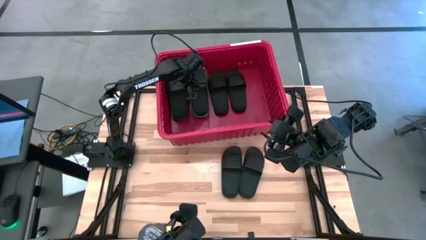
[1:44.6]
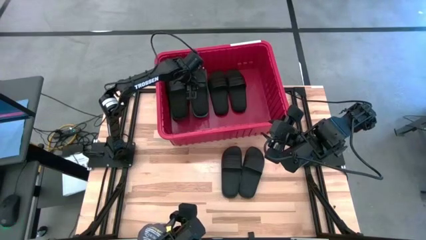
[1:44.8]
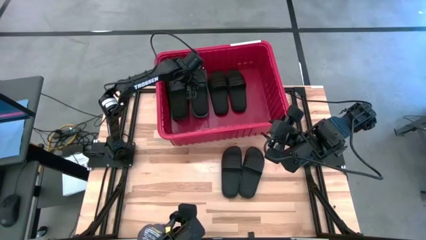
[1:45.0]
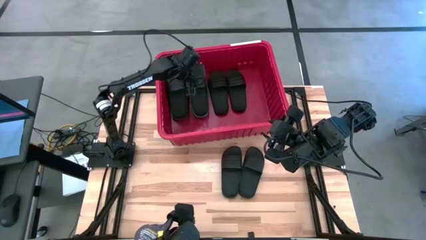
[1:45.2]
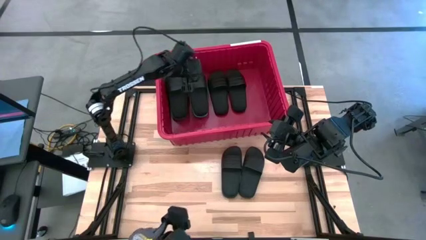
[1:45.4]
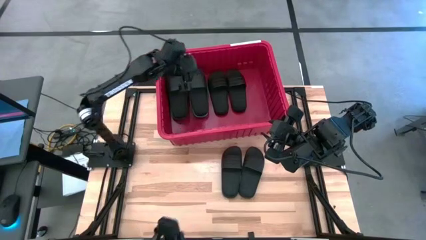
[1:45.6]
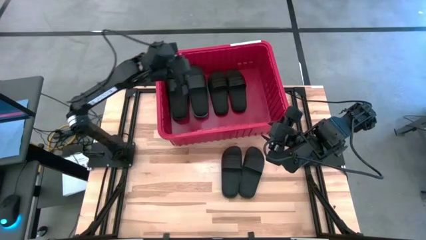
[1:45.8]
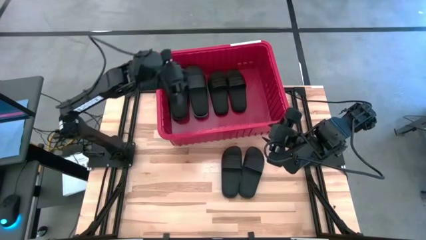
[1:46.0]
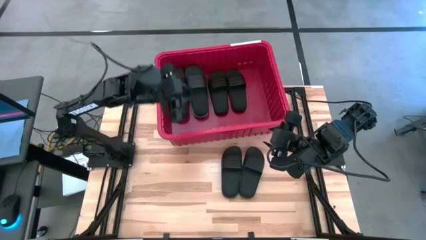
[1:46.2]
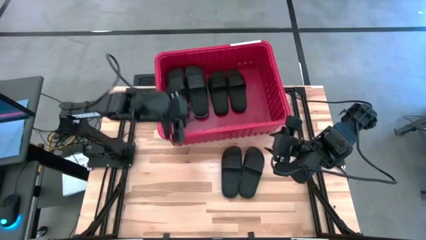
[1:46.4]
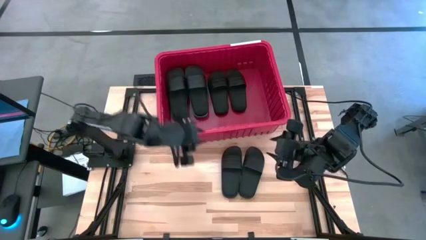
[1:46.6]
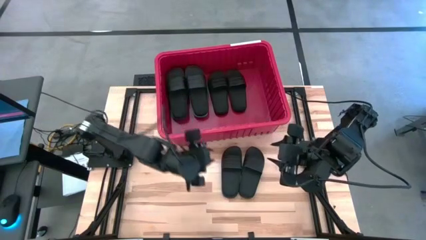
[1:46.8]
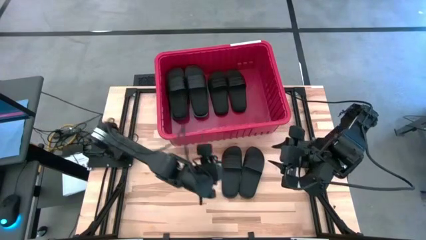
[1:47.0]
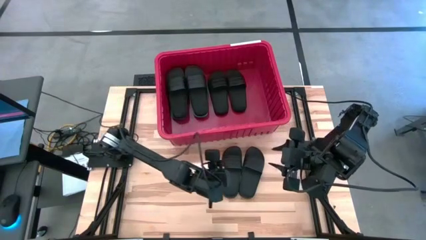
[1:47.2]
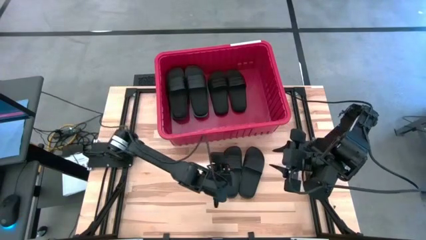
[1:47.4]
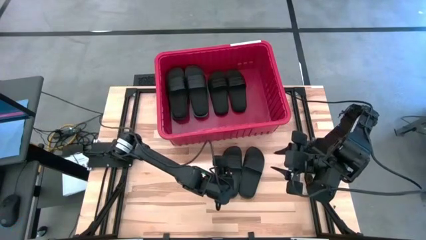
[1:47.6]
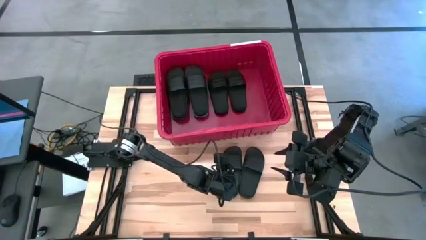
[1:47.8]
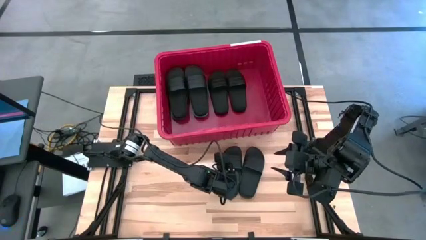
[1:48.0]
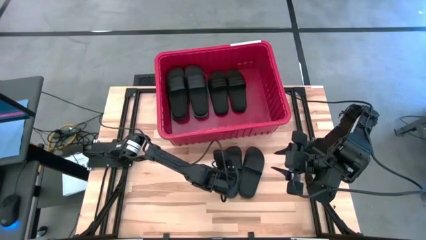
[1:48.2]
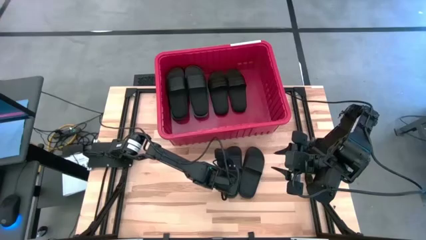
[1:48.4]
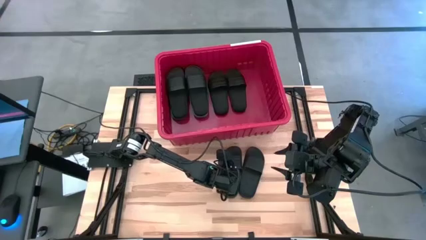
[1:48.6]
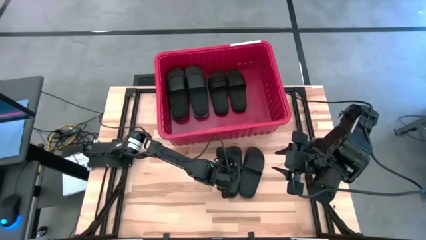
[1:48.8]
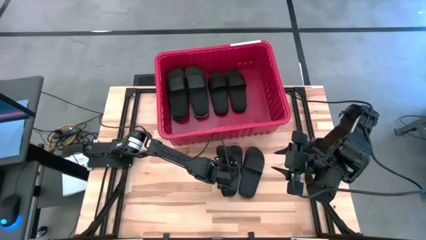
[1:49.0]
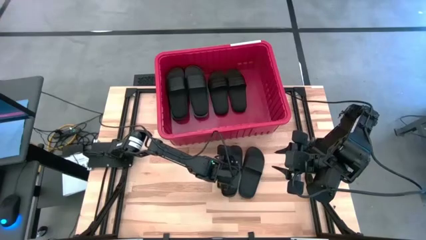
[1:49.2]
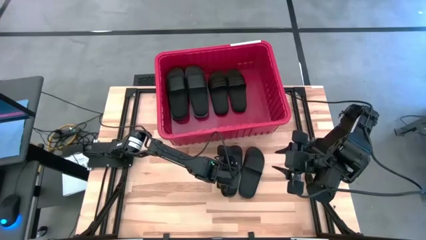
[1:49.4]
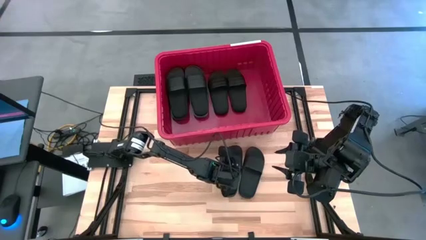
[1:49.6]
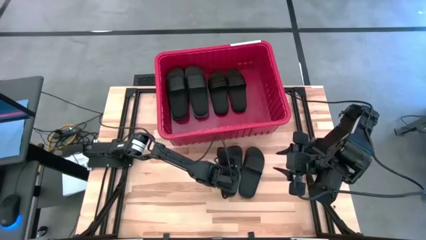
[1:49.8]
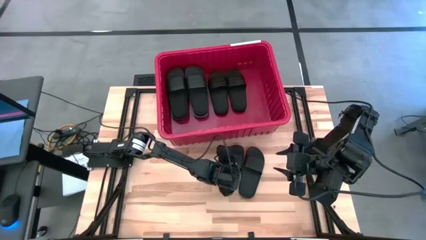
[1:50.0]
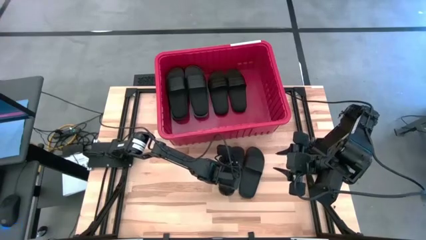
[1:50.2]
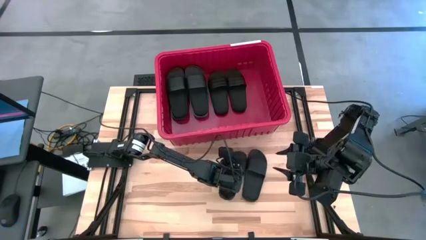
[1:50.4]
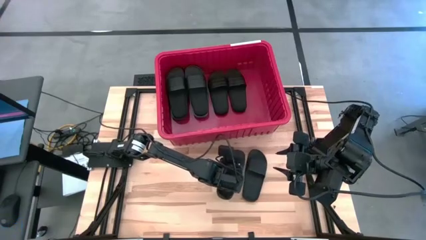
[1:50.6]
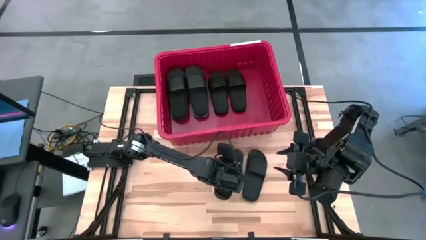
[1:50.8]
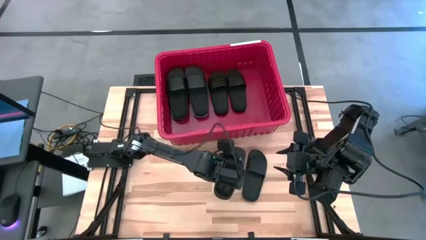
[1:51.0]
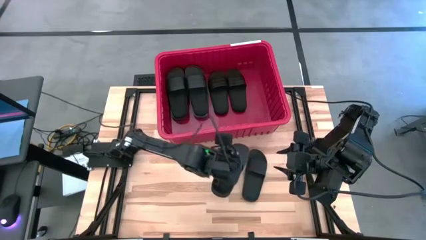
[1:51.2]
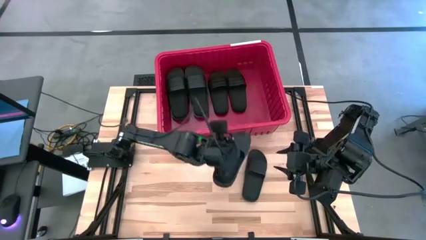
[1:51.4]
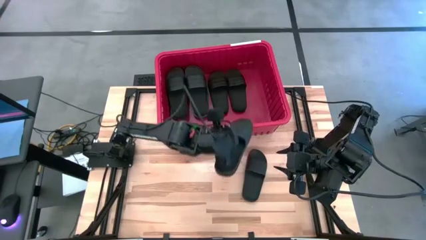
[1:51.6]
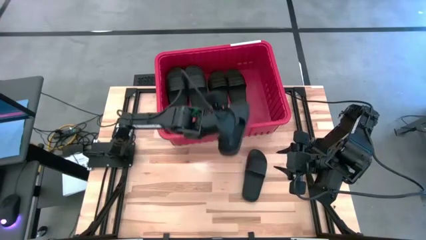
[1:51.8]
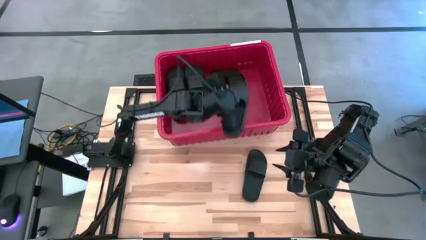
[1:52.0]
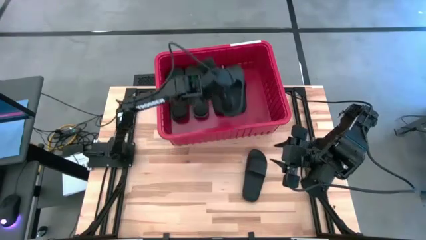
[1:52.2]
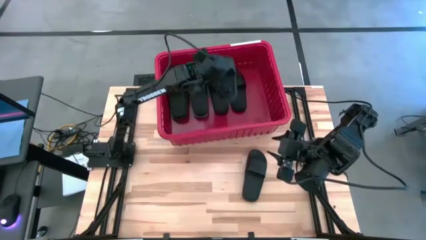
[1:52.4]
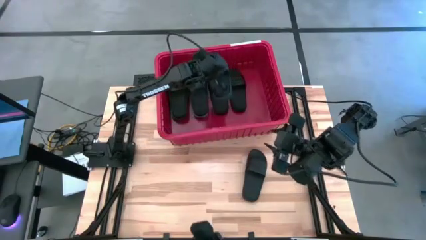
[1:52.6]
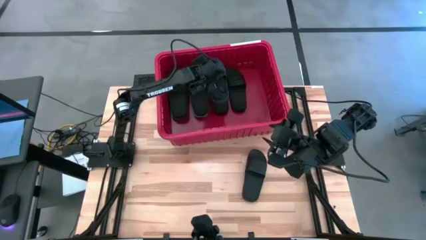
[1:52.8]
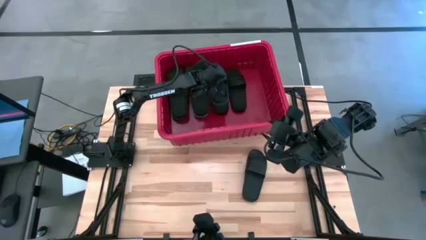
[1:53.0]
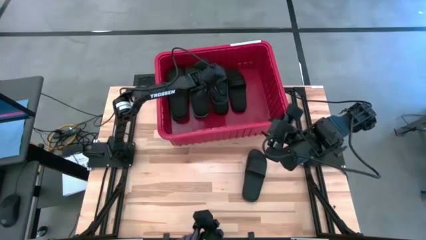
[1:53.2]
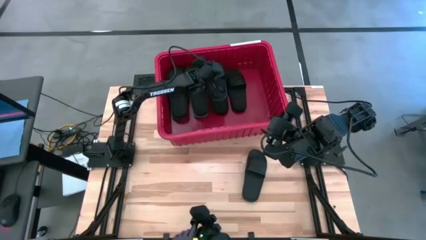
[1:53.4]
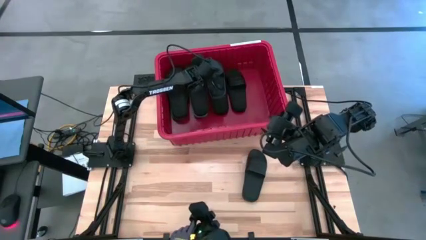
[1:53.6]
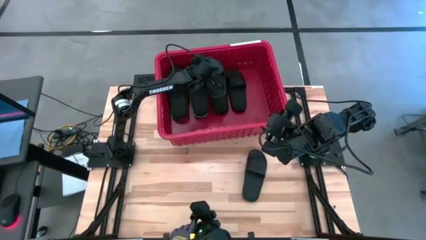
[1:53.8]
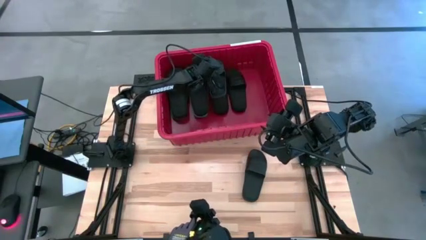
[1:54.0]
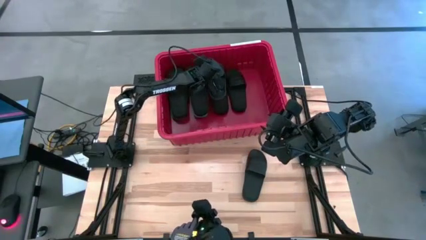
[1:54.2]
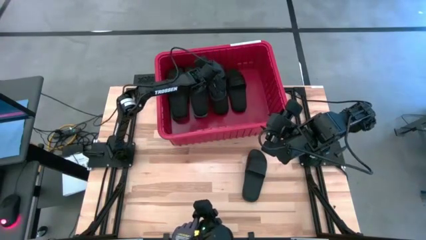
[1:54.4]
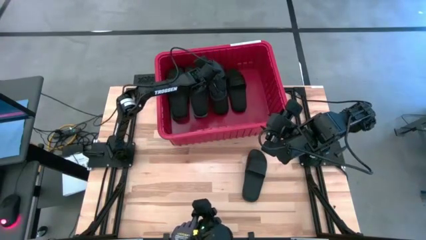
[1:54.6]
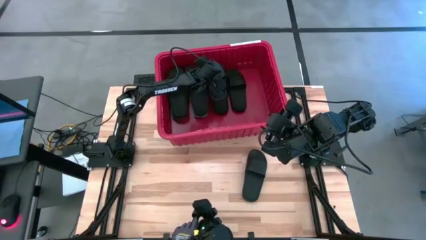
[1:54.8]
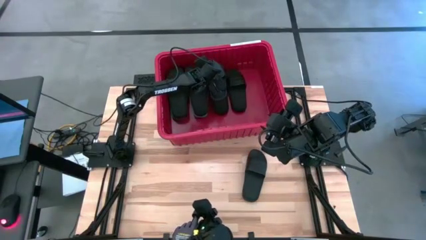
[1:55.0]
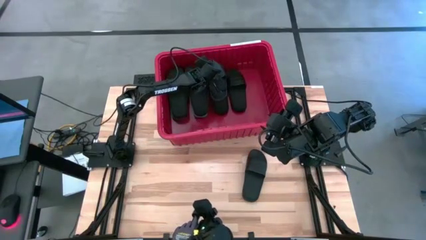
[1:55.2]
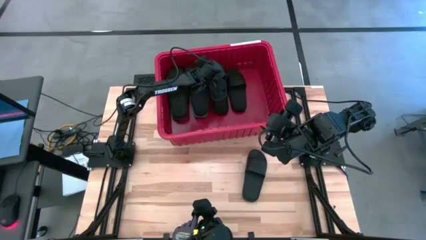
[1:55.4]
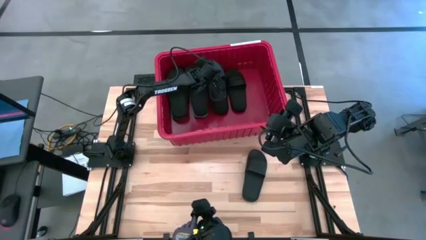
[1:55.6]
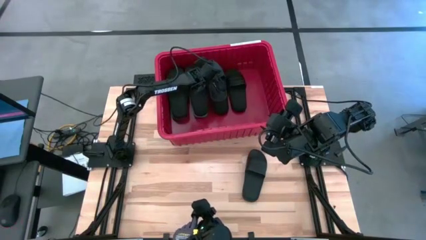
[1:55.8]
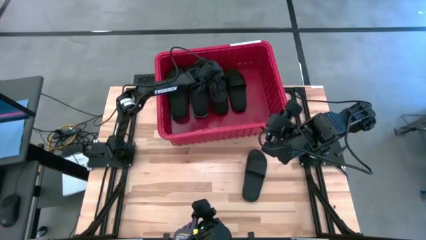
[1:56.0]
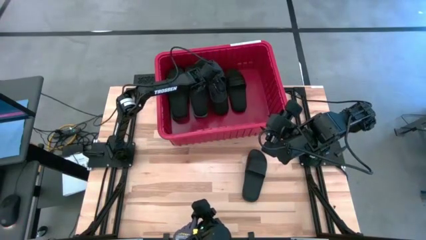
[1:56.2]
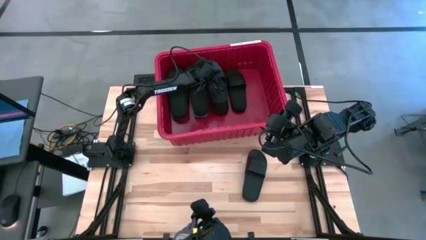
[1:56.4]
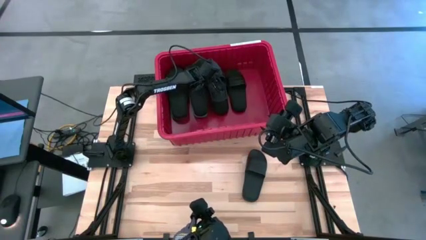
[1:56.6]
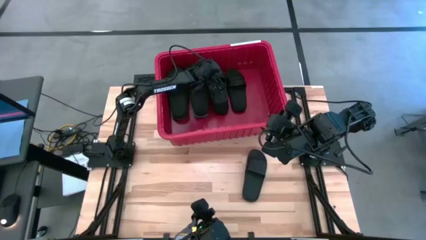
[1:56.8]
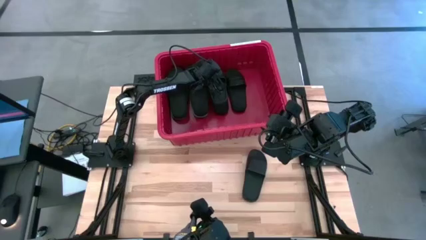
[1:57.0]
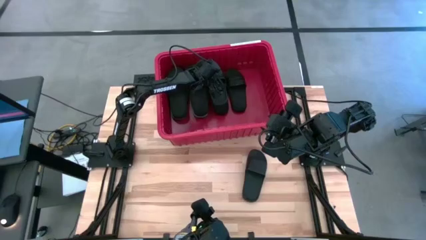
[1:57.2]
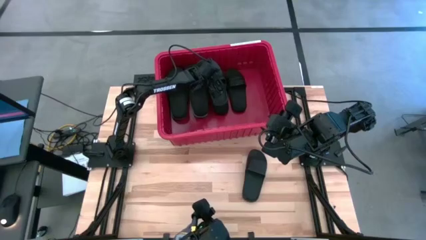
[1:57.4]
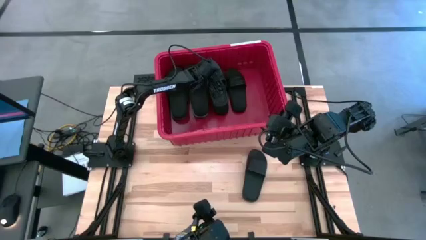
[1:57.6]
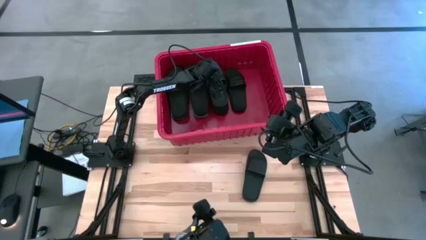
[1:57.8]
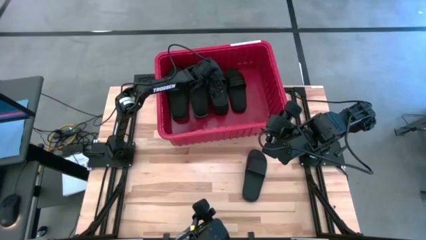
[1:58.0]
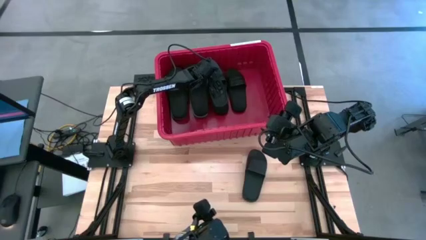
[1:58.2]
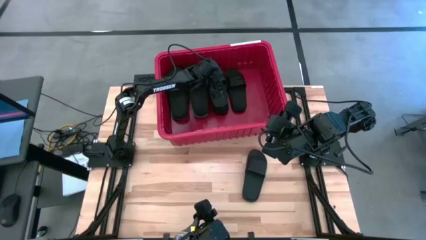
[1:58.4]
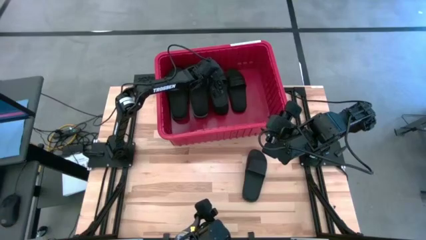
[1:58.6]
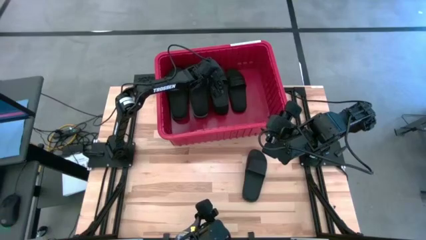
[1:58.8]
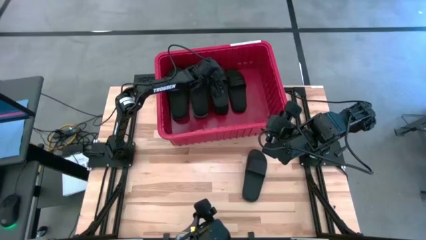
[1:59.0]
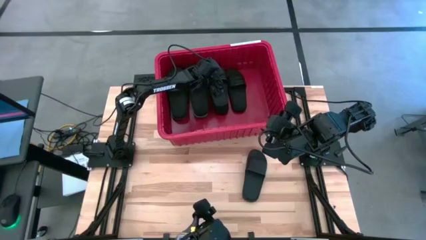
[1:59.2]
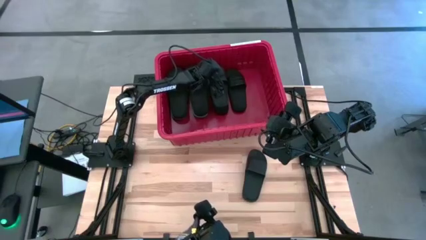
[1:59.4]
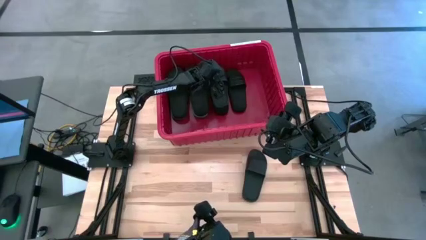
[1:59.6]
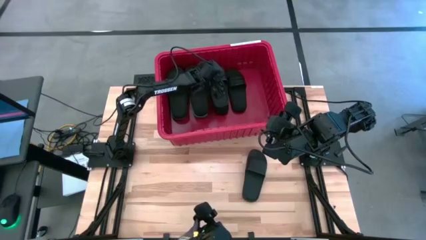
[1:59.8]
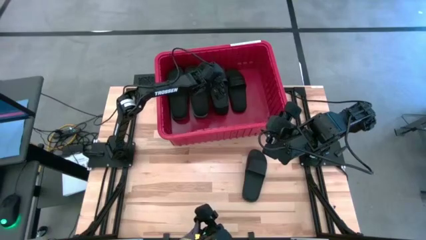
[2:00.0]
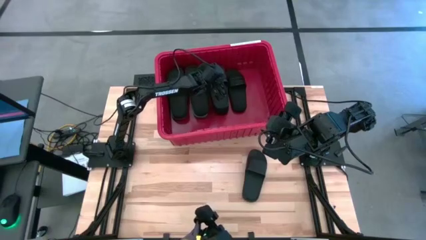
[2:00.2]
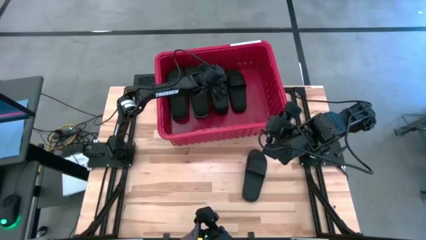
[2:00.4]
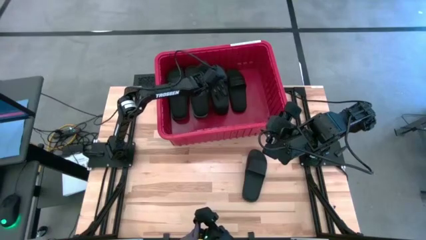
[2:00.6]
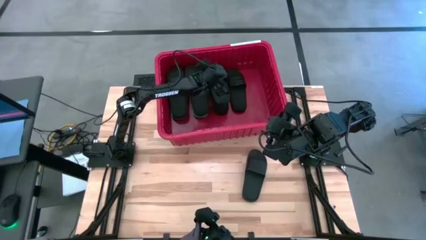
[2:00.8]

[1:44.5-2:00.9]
Task: Pick and place slides into bin
Put the black slipper into the red container
